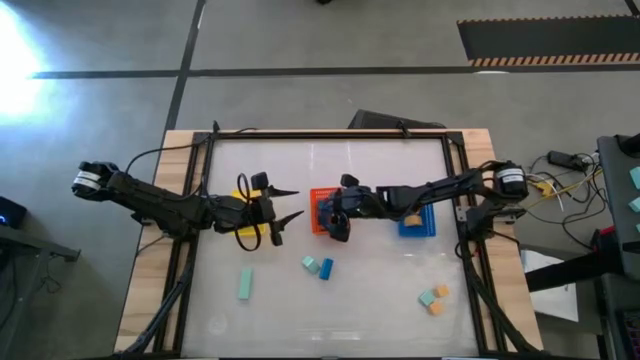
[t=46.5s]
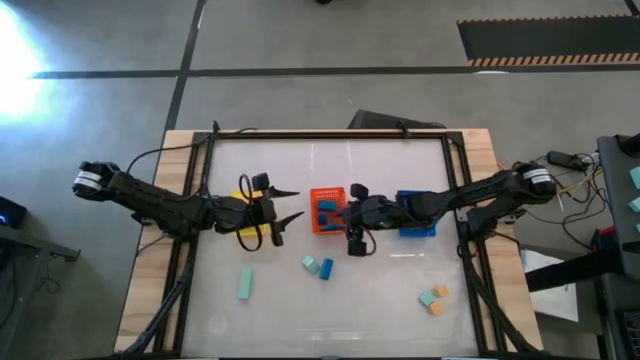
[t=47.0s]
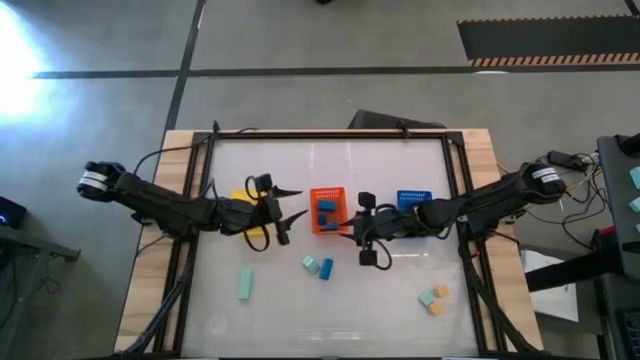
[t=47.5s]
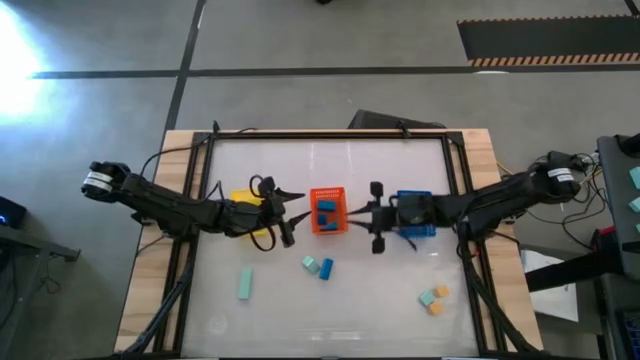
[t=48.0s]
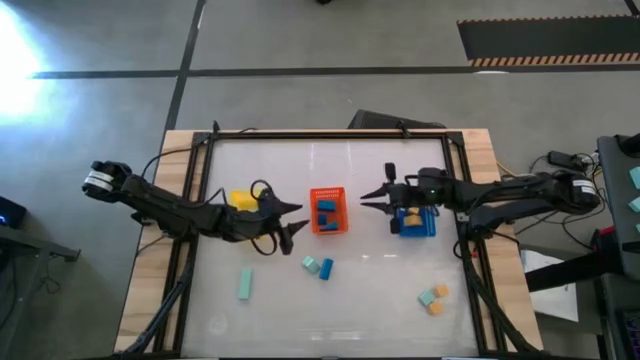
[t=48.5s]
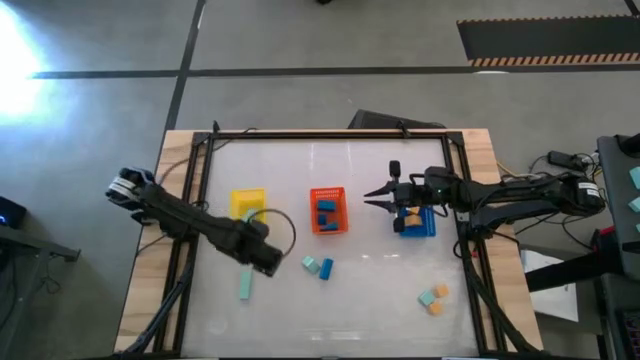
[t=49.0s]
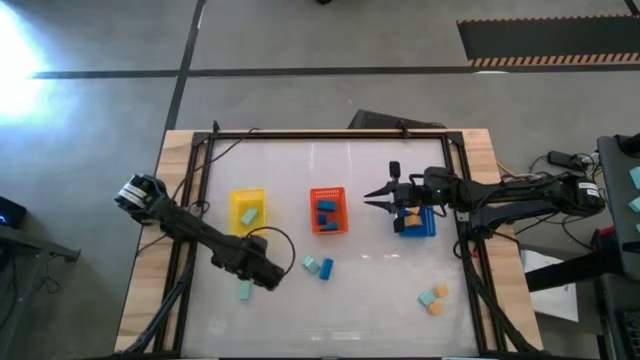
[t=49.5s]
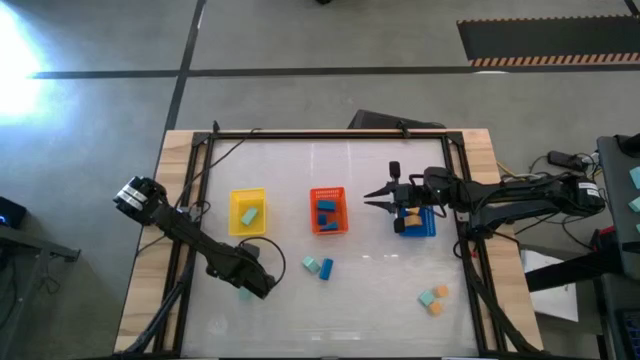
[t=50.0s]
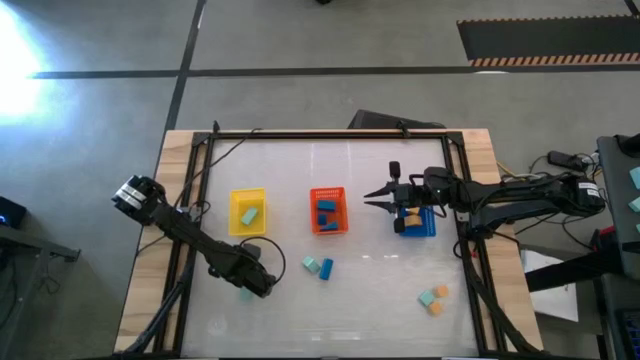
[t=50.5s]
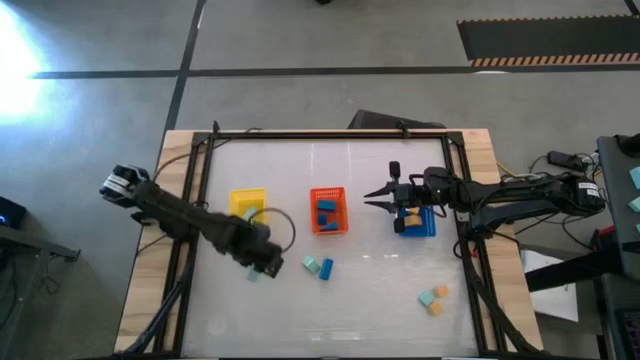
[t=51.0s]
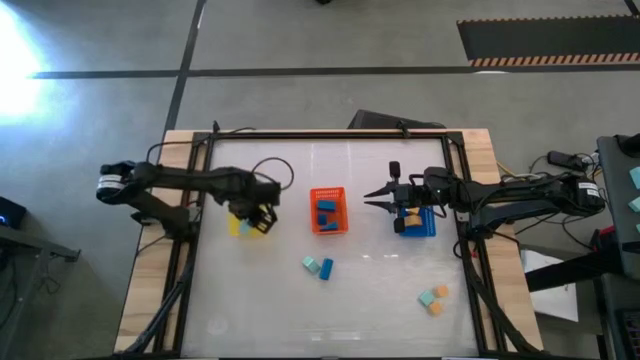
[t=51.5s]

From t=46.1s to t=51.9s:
Task: Sort & place blocks by color
Put the light blue block into the yellow bin

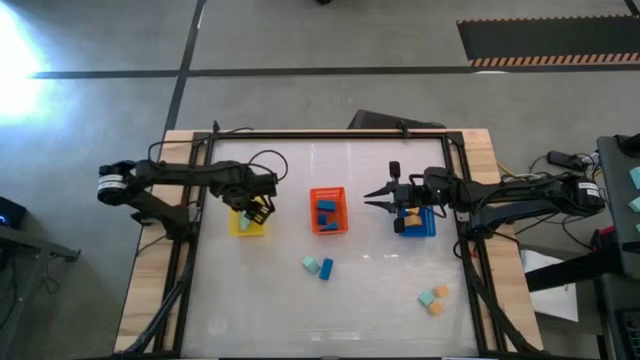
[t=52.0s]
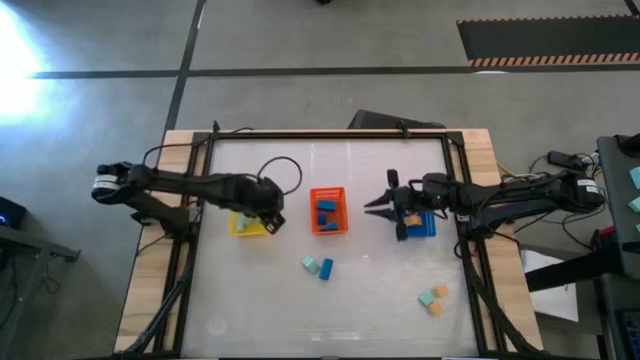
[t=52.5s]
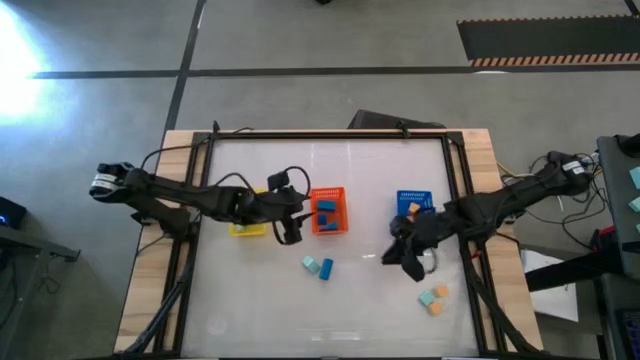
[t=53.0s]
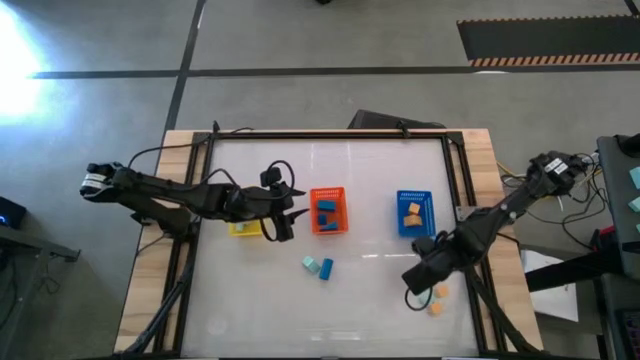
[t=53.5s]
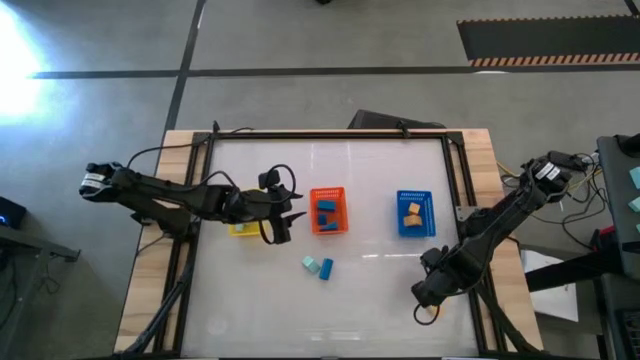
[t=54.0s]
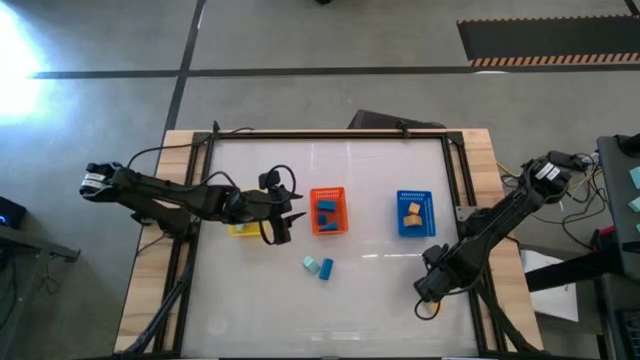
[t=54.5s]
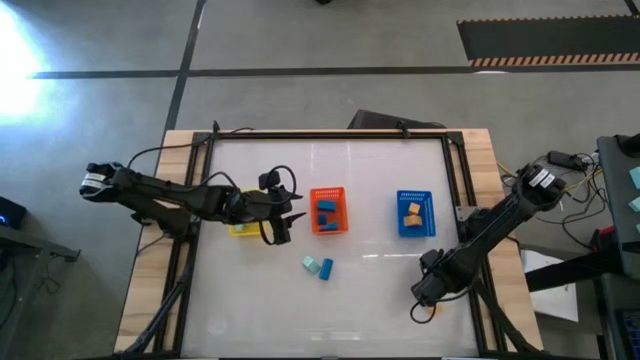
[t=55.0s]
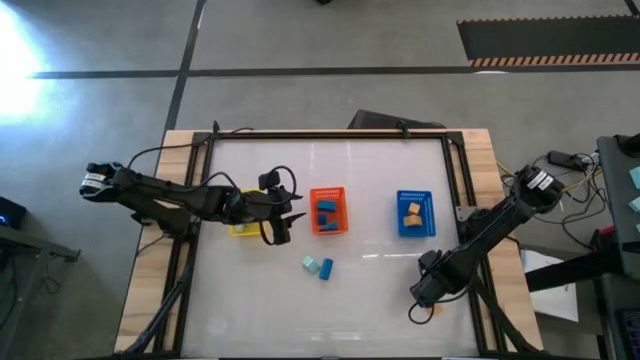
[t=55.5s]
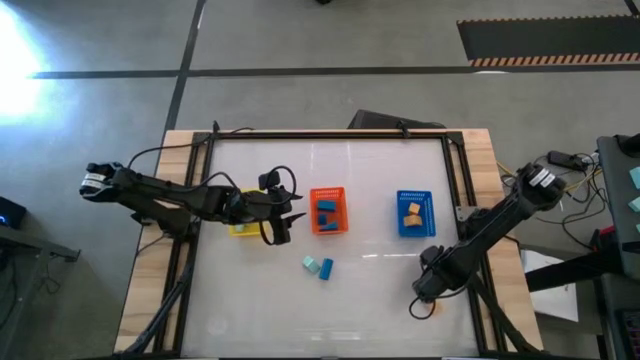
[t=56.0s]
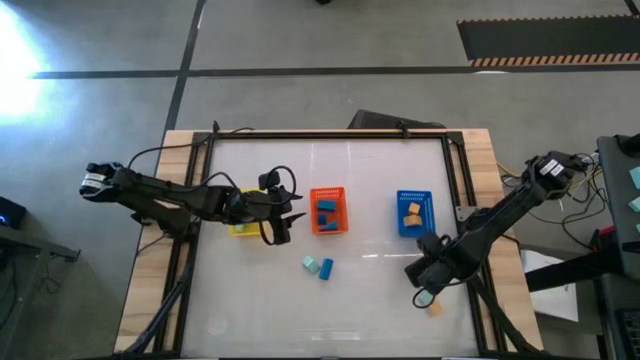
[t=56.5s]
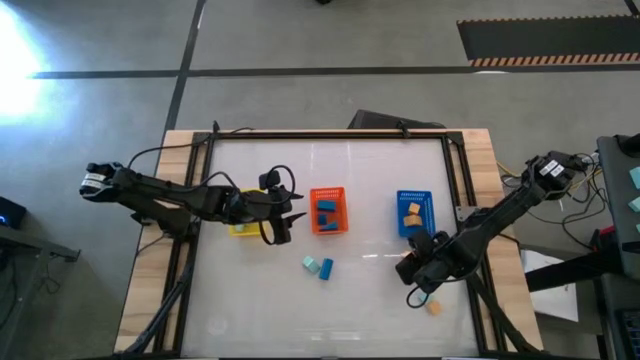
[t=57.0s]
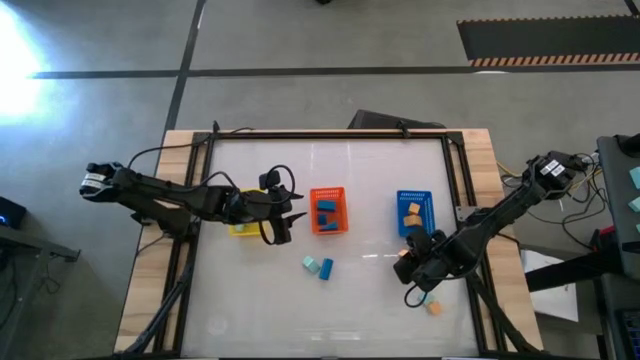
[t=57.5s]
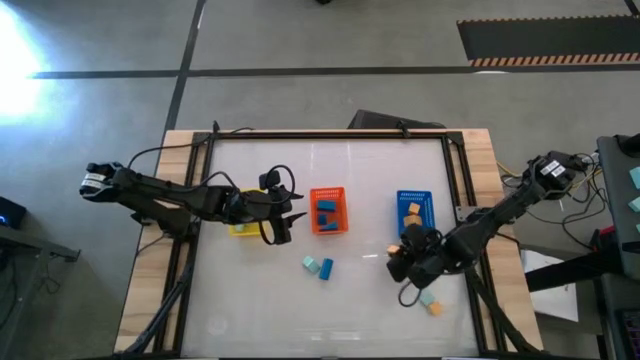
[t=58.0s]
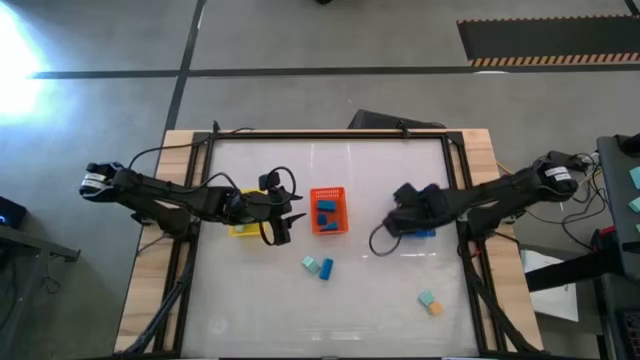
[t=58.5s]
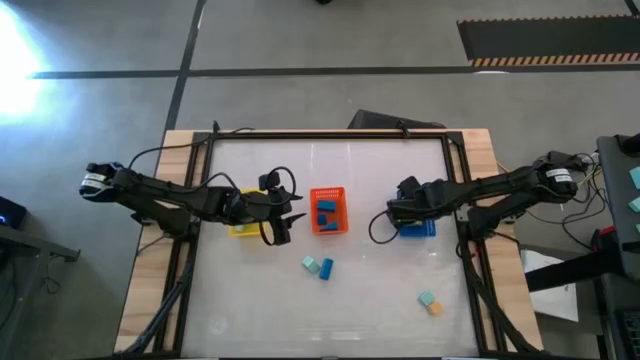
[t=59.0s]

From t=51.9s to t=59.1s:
Put the yellow block into the blue bin

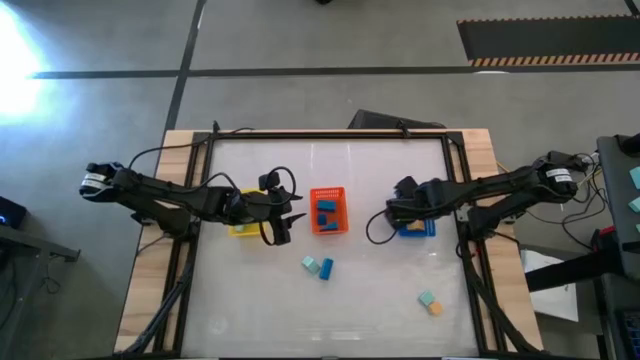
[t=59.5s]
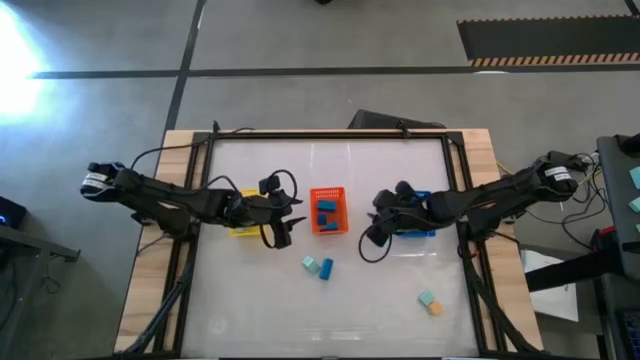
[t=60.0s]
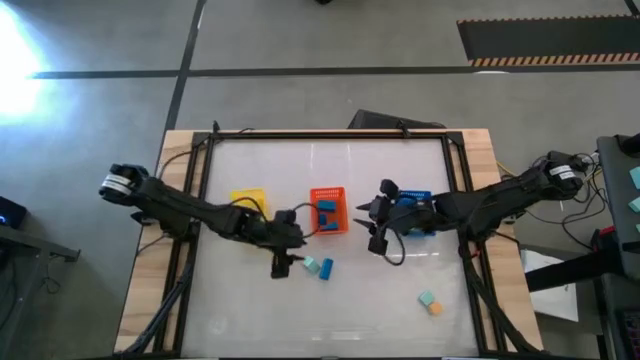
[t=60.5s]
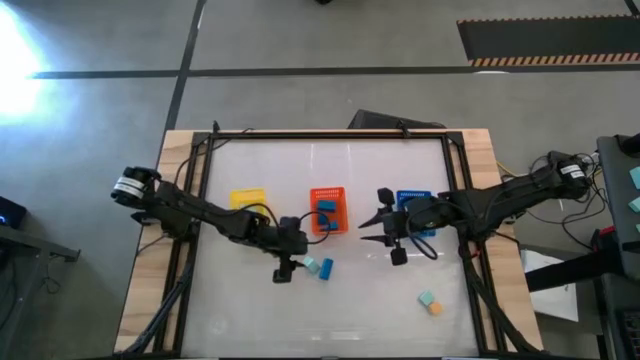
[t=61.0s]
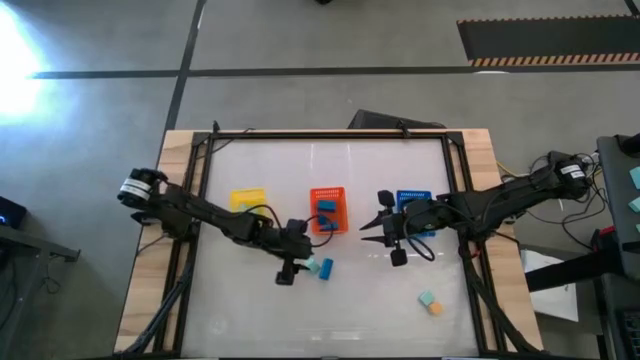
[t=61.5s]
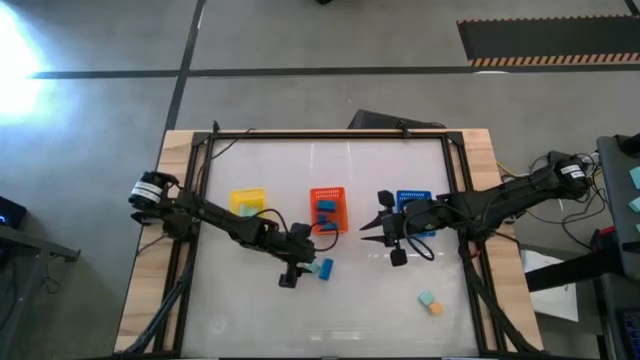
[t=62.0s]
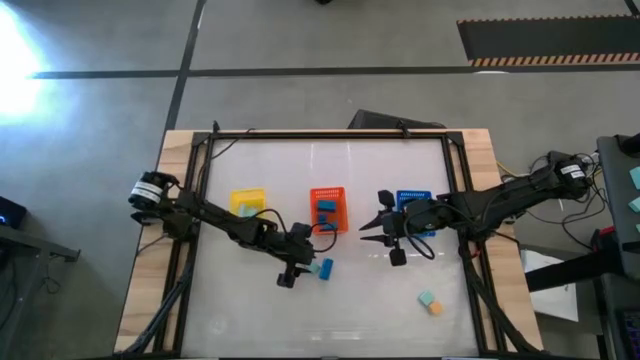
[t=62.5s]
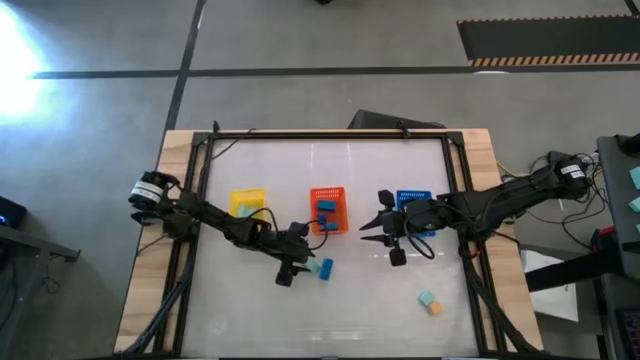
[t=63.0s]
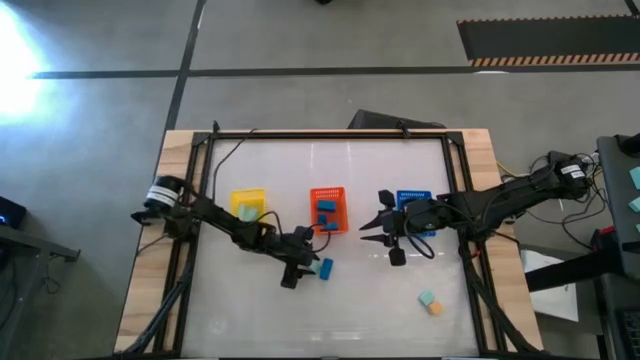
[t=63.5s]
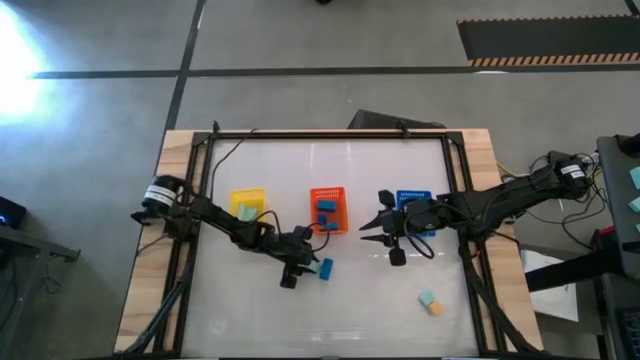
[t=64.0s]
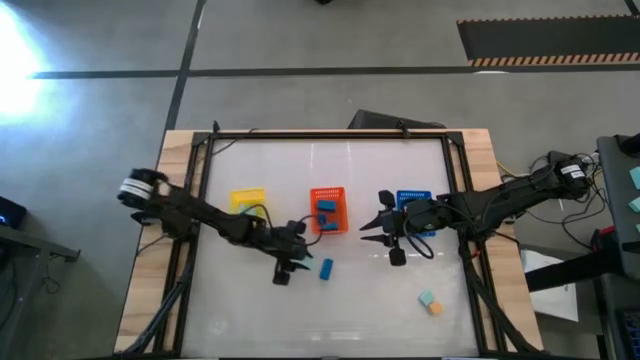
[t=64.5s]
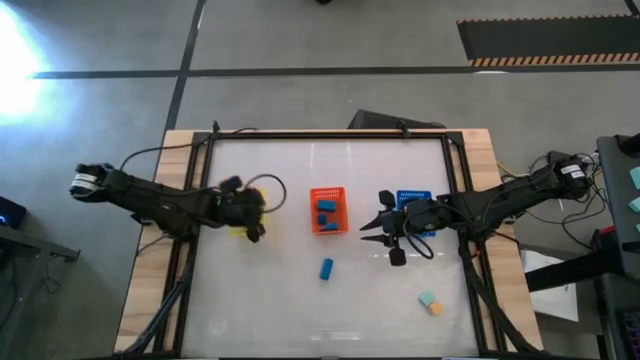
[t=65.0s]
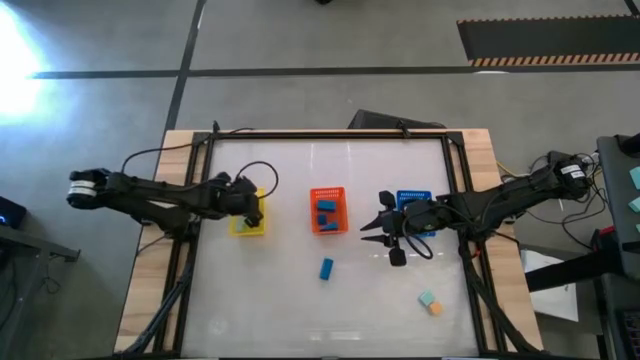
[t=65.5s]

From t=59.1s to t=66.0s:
Put the light blue block into the yellow bin

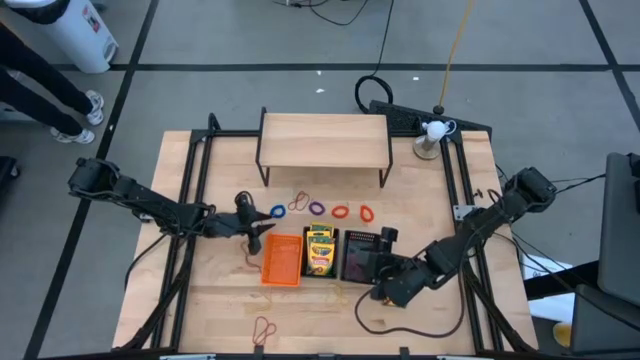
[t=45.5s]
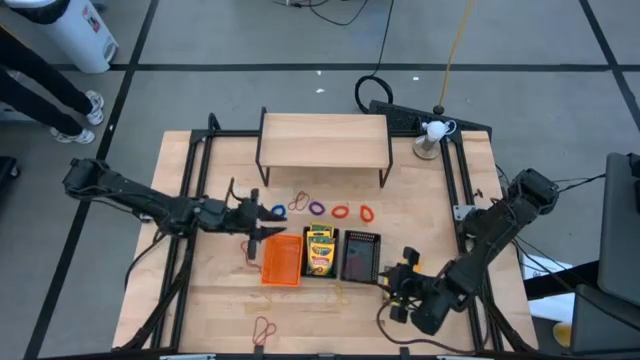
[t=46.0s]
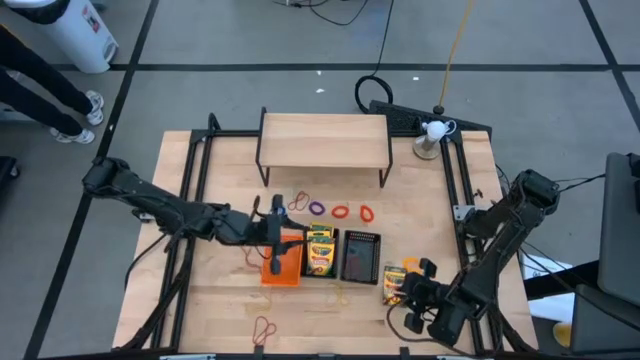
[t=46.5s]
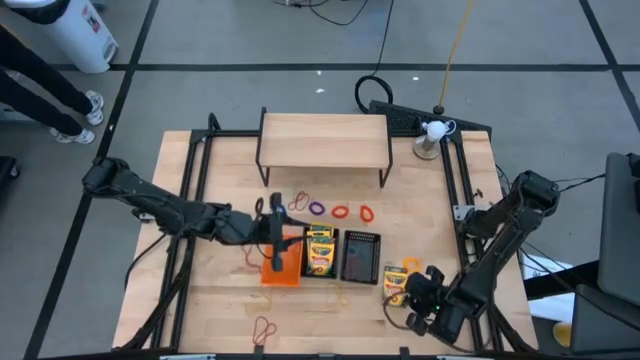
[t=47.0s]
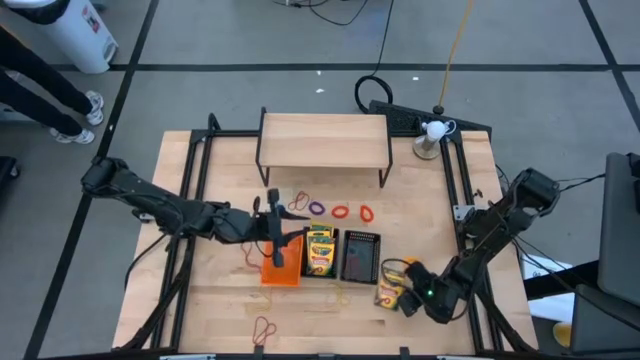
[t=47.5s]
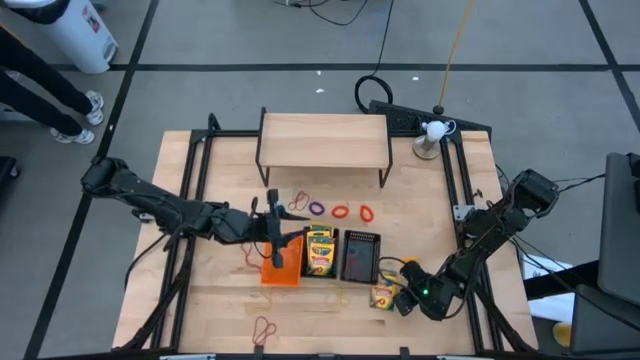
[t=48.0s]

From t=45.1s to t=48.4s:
Task: Pick & Place Office Desk Supplies
Put the crayon box into the left black bin
